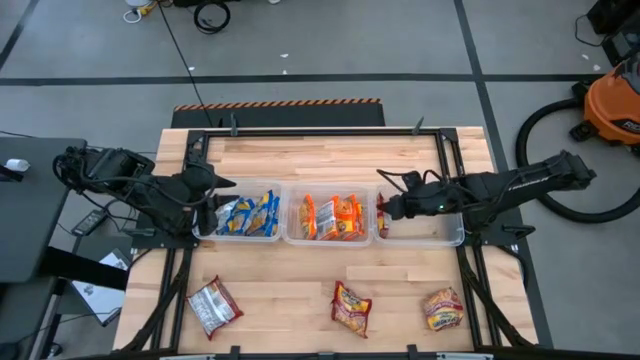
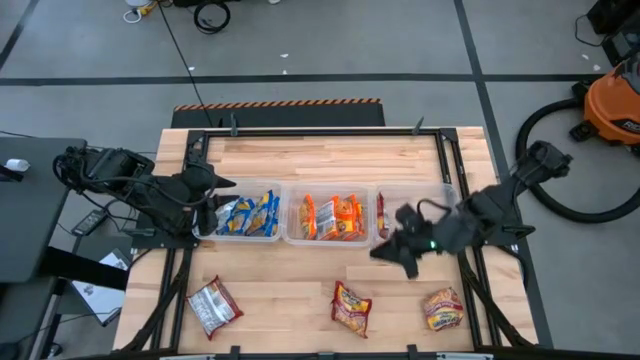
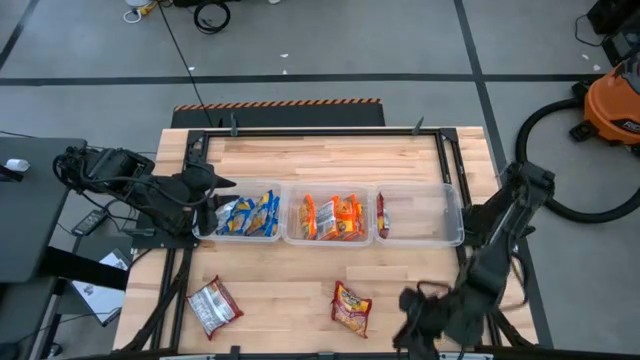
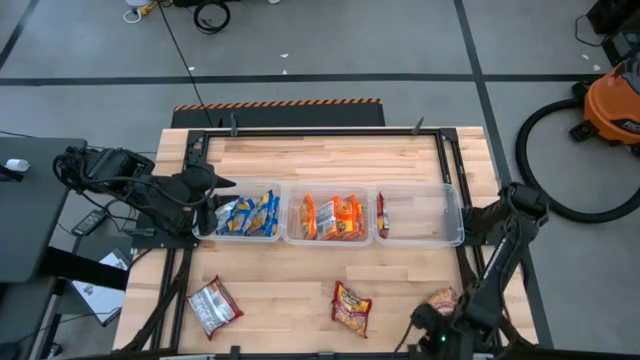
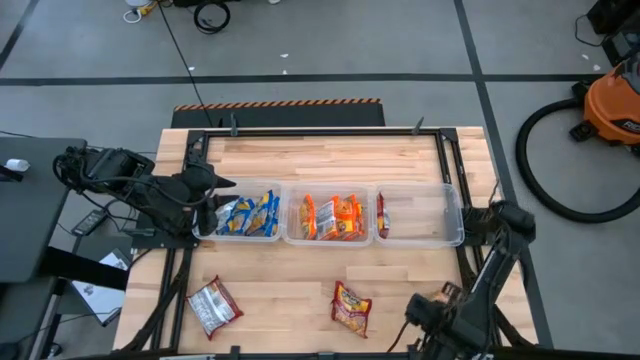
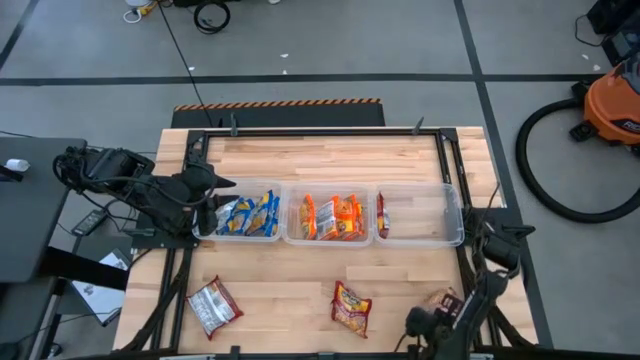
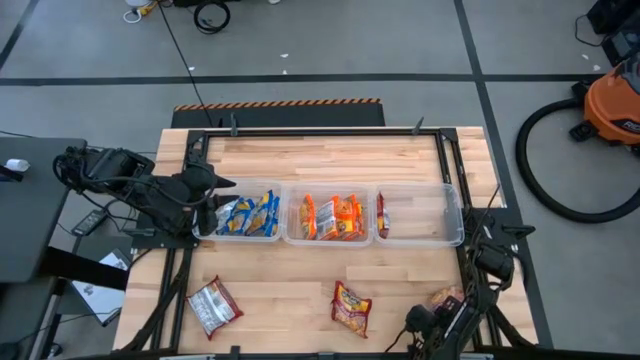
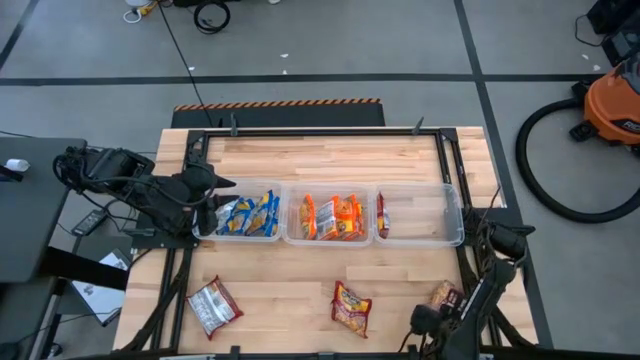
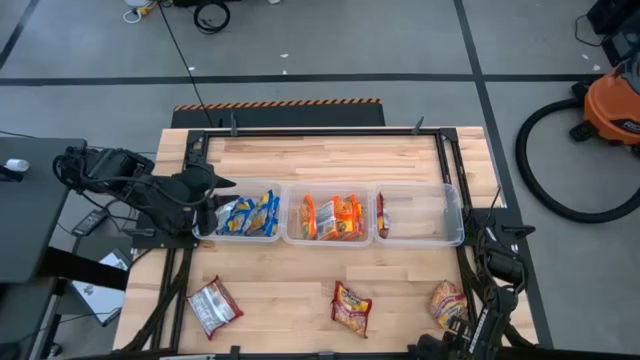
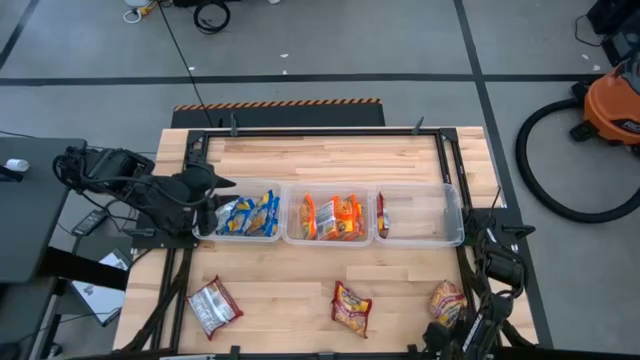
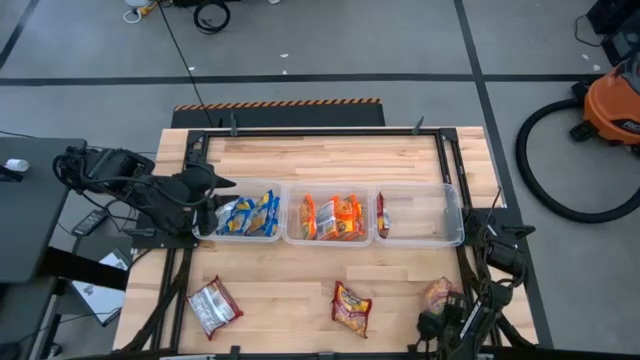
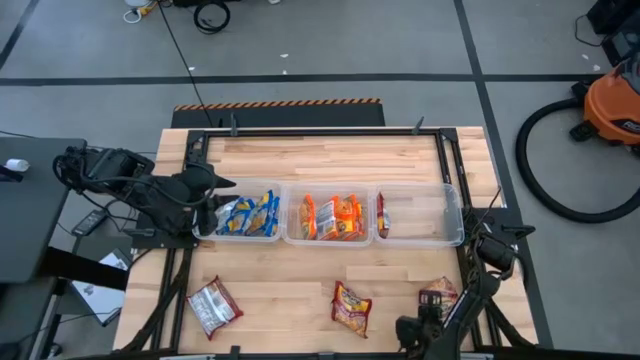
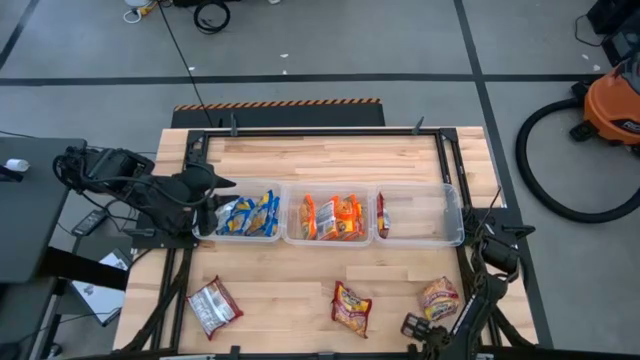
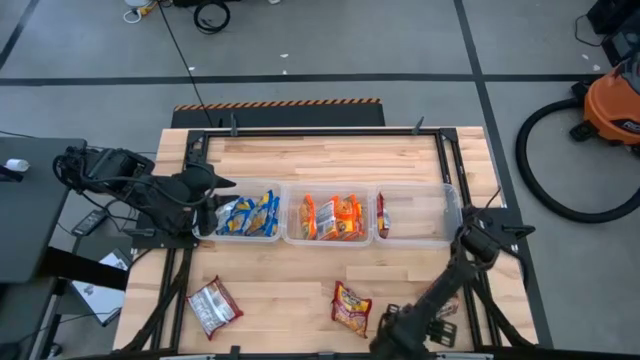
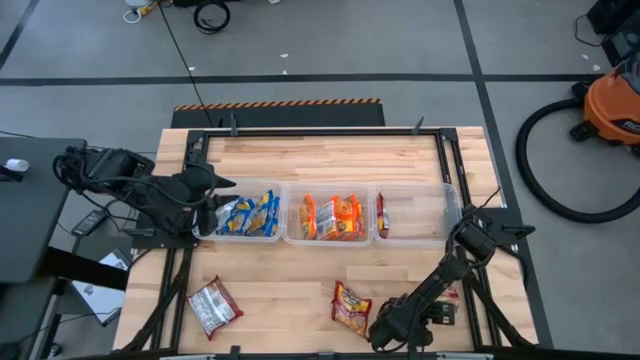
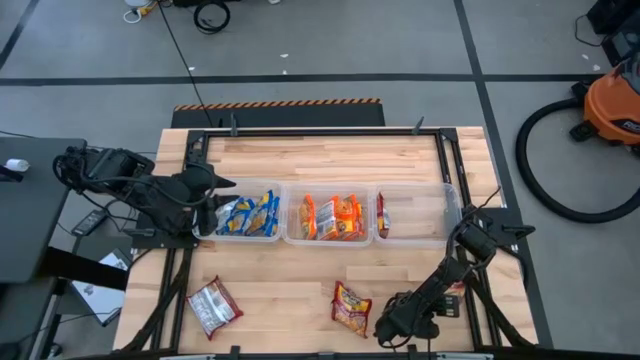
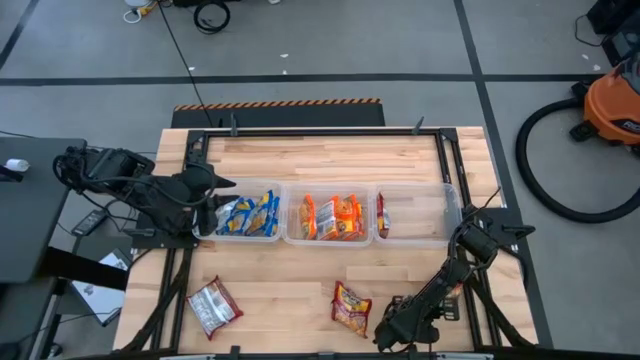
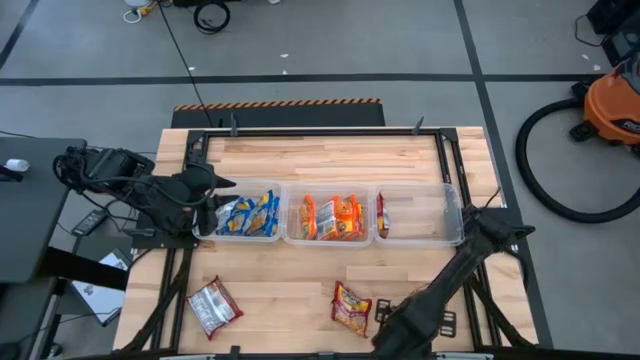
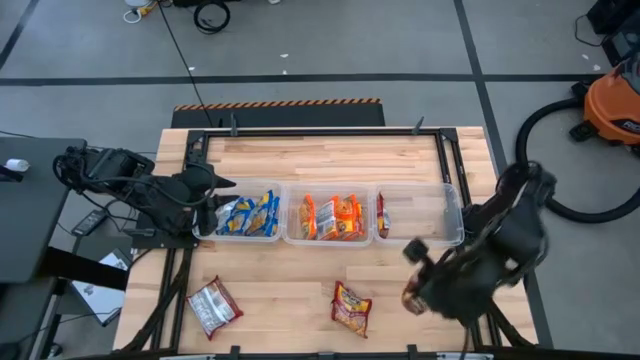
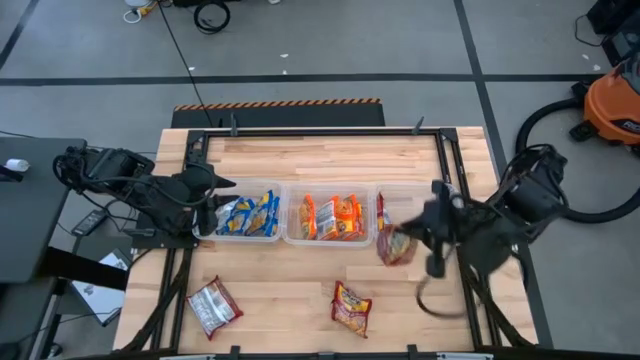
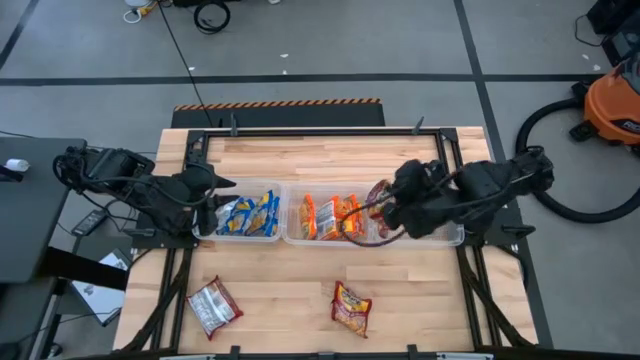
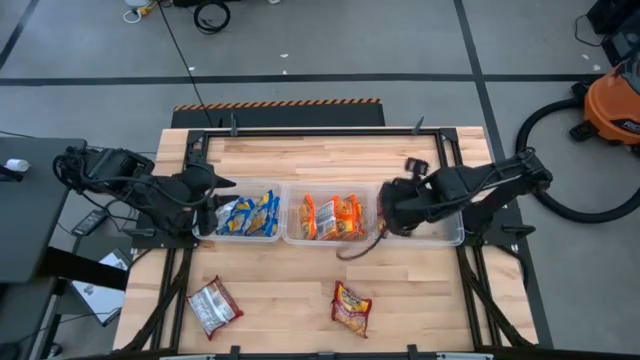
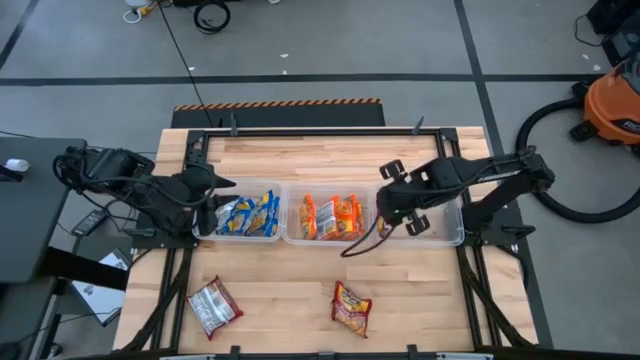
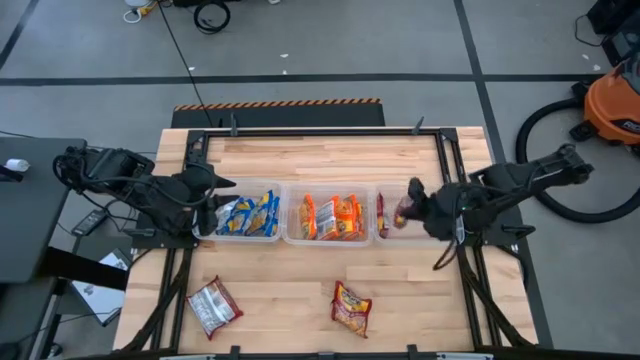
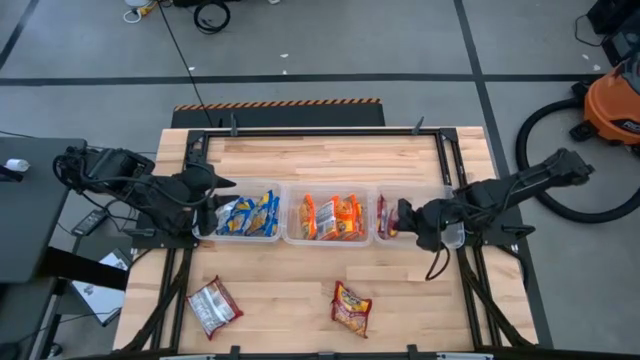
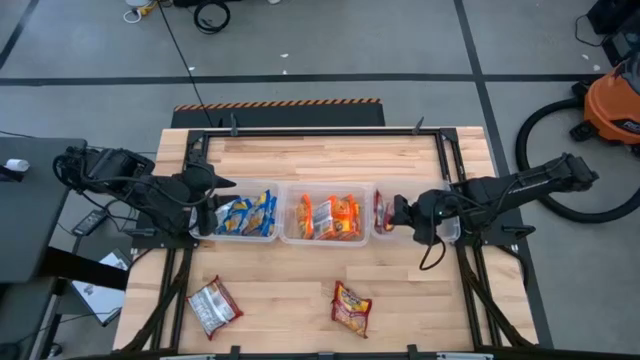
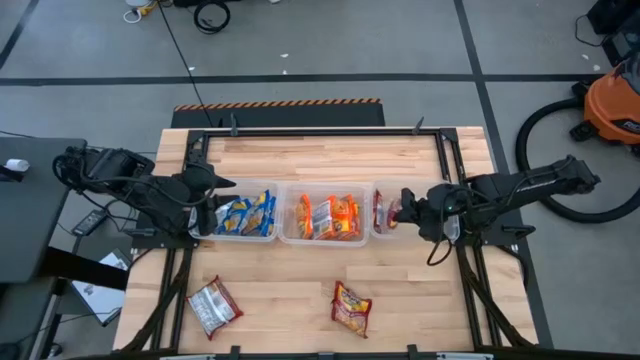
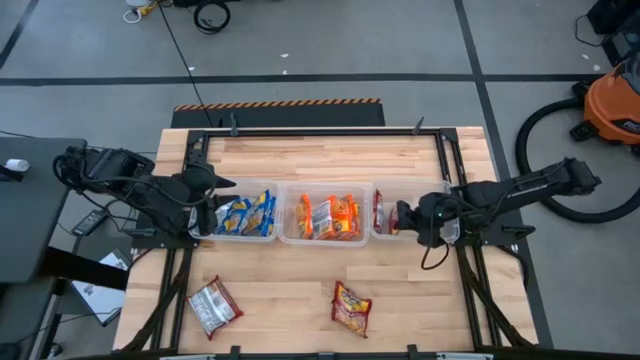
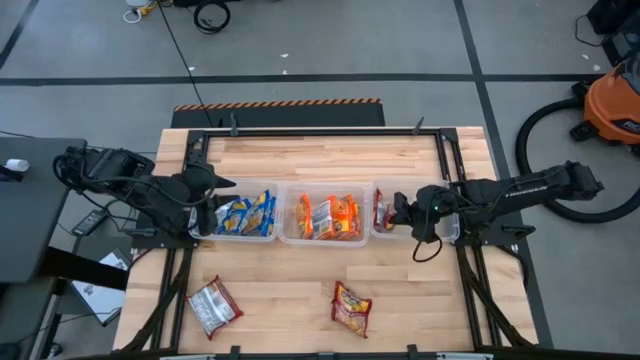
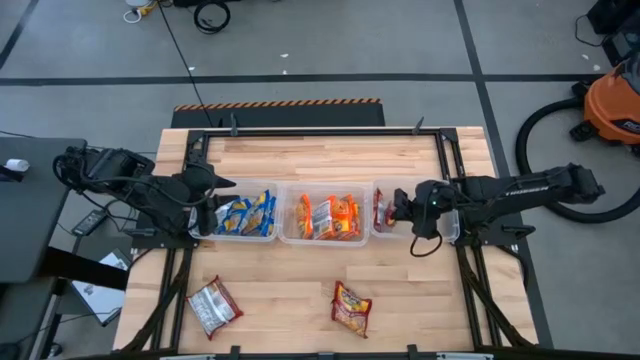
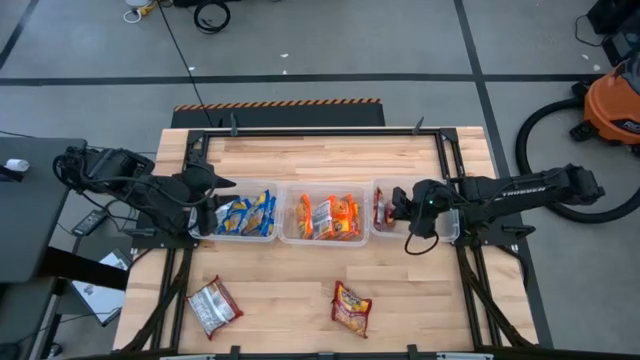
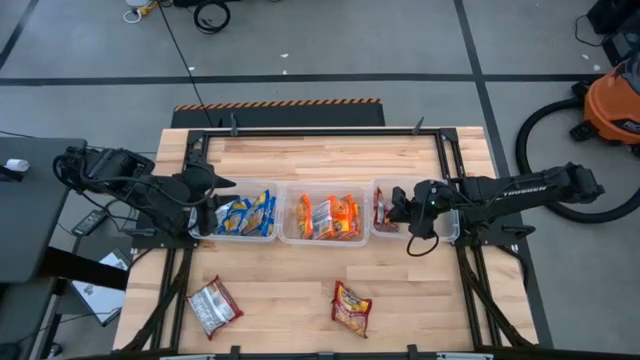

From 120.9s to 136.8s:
Task: Sort Maruchan noodles
Put the red noodle pack into the right transparent bin

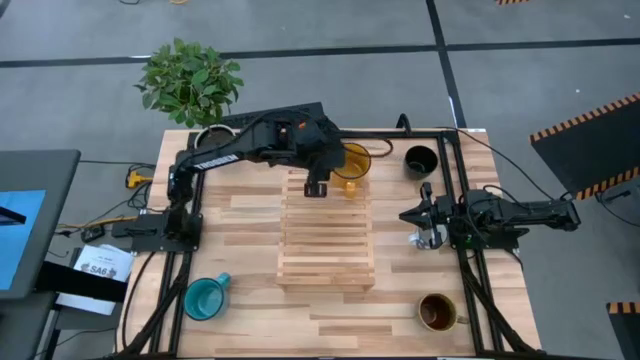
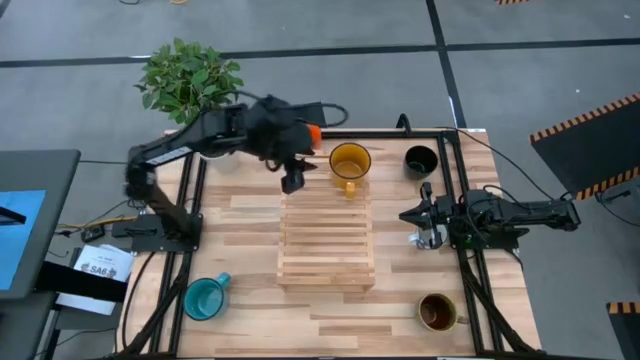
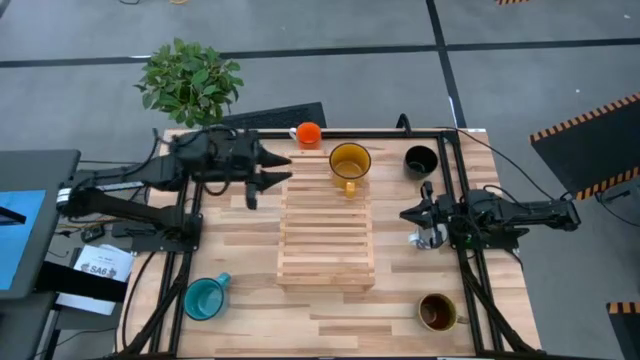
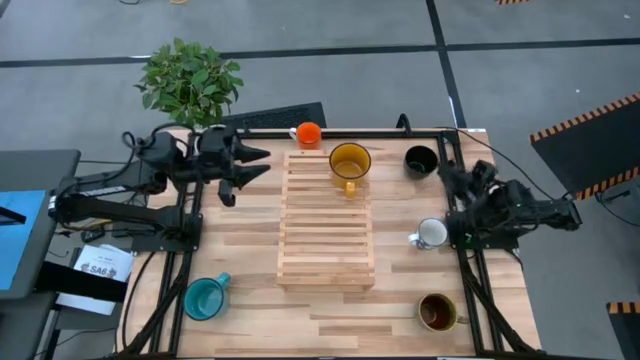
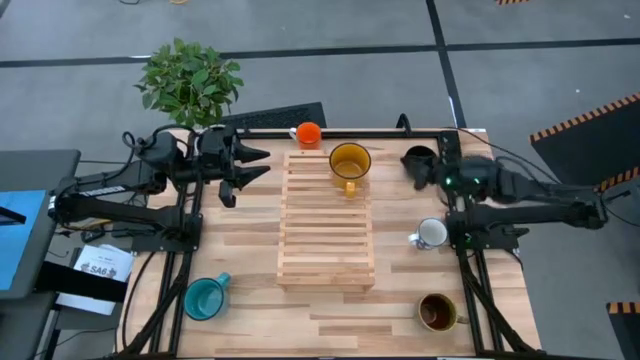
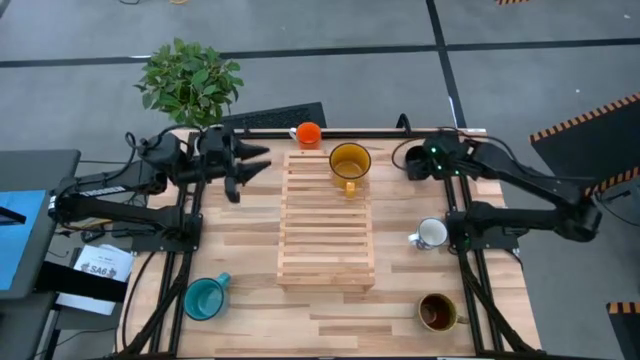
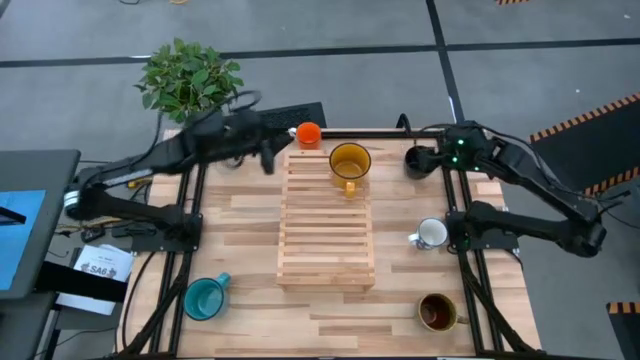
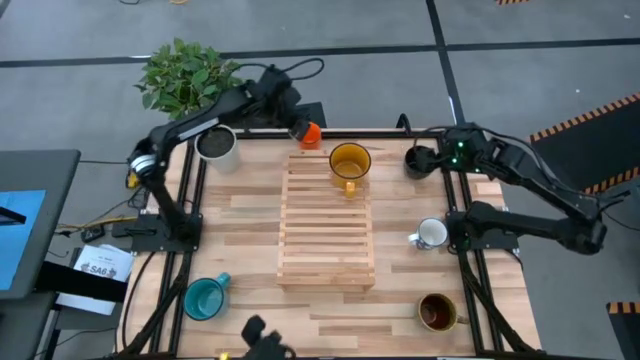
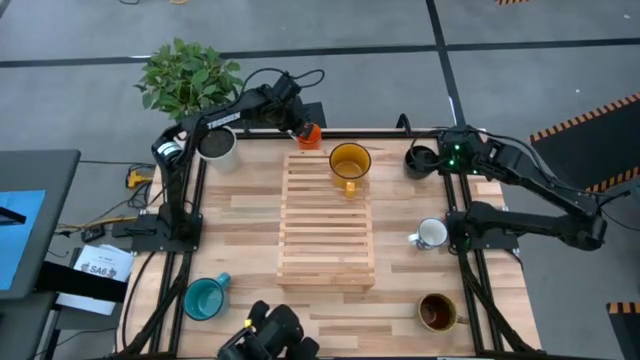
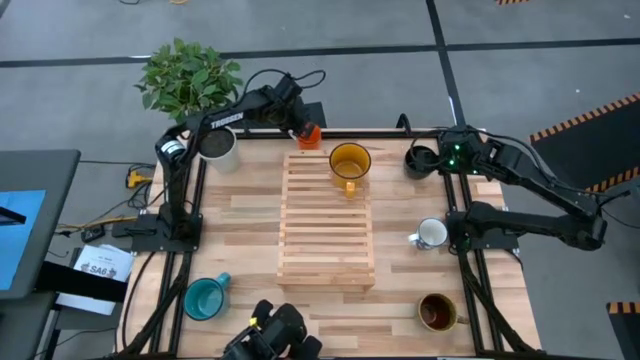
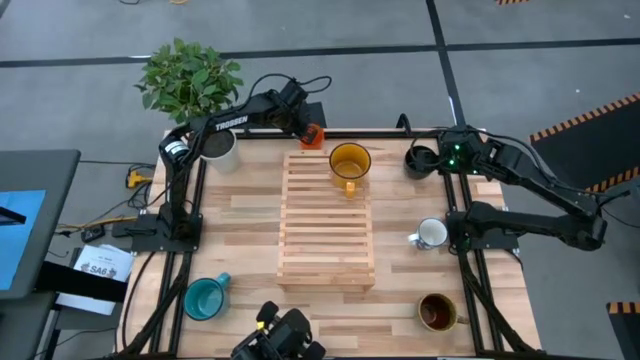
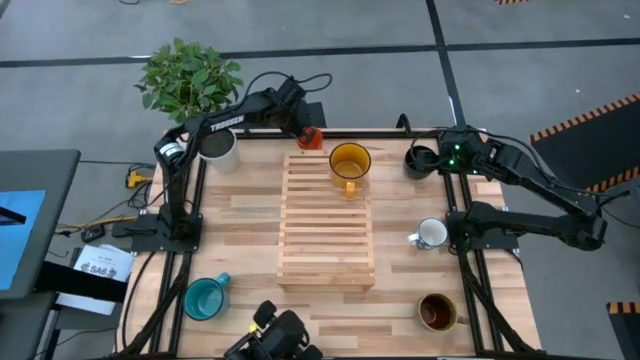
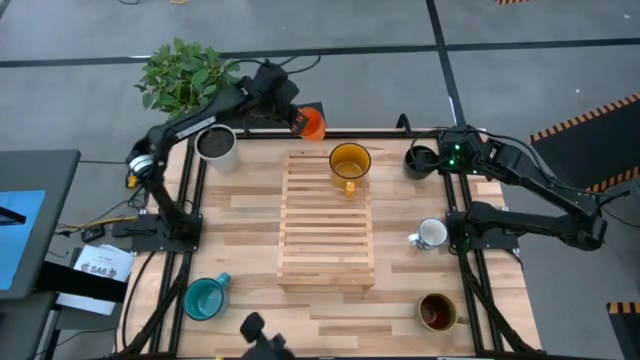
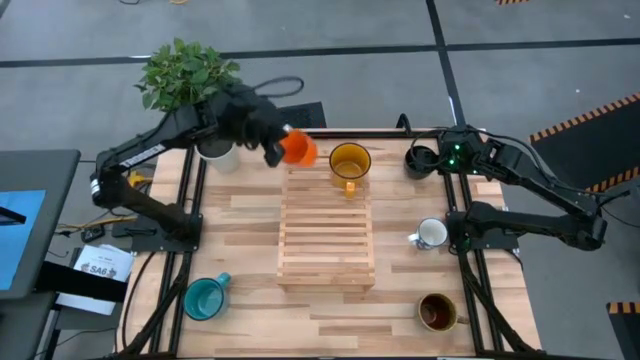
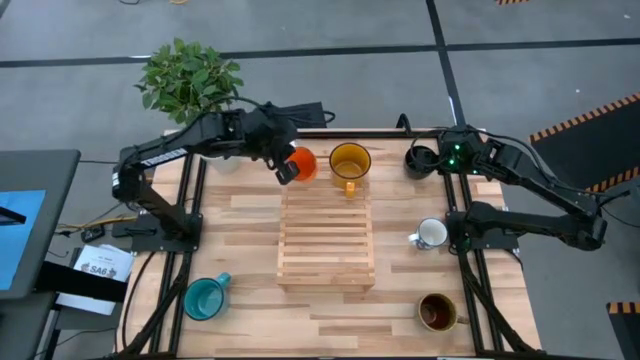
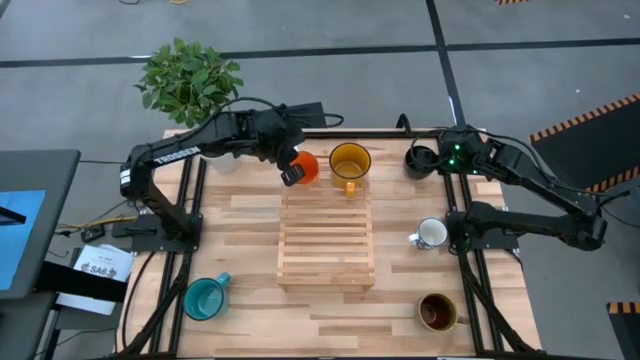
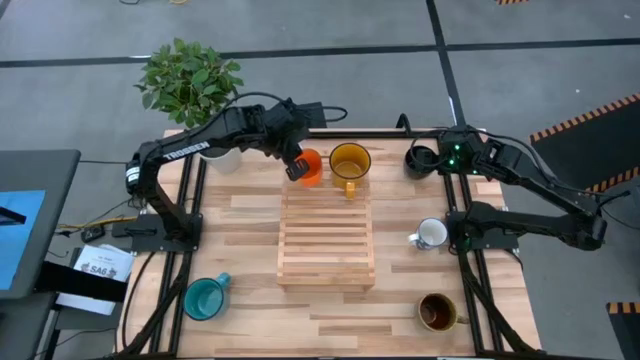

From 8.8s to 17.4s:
Task: Place coffee mugs
Put the orange mug on the shelf
